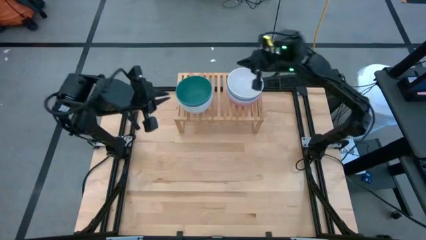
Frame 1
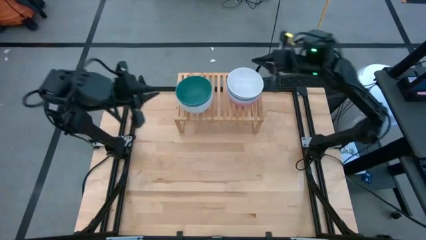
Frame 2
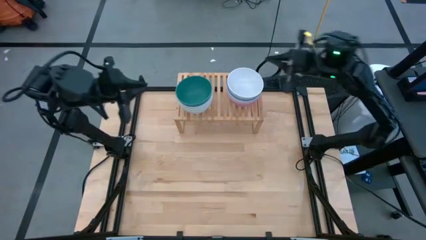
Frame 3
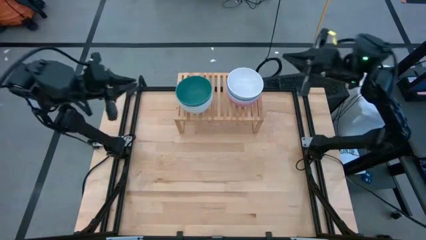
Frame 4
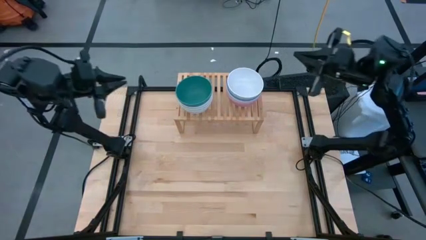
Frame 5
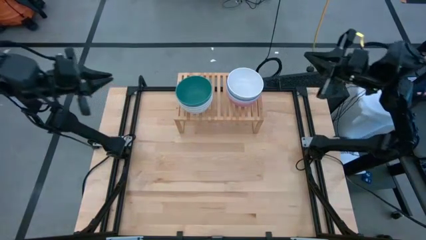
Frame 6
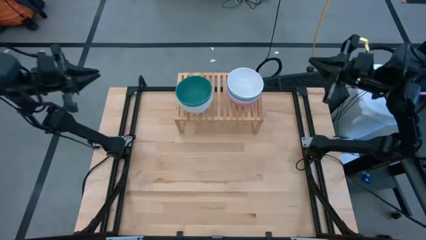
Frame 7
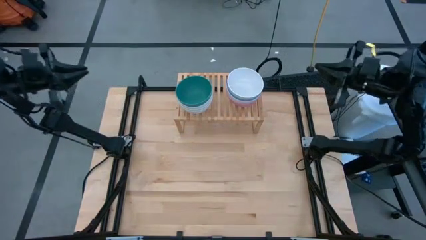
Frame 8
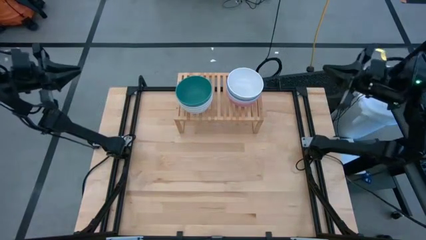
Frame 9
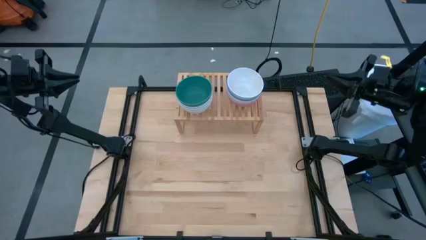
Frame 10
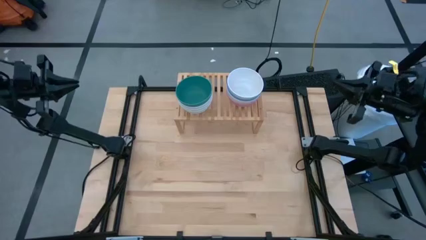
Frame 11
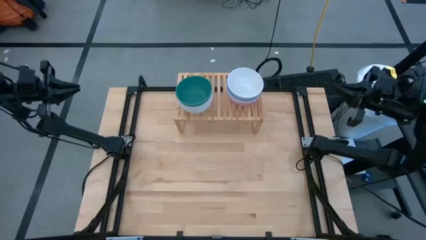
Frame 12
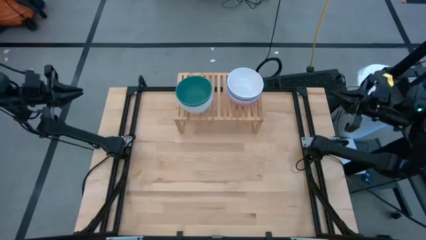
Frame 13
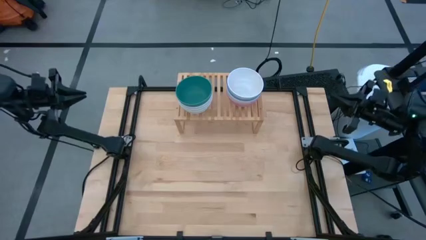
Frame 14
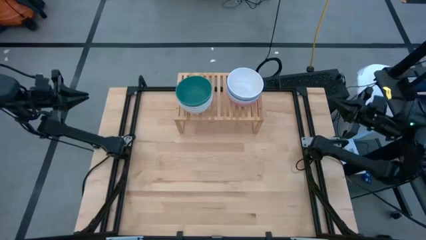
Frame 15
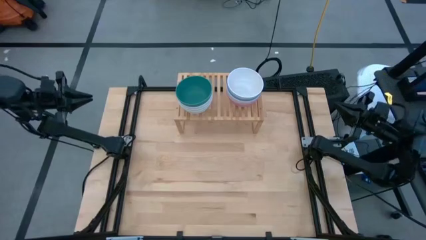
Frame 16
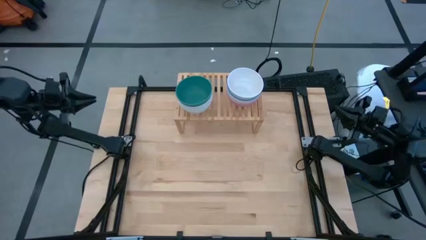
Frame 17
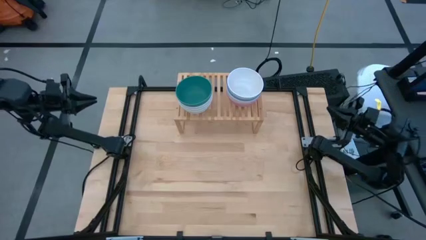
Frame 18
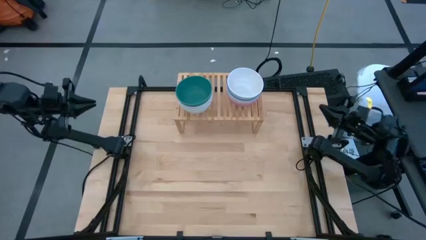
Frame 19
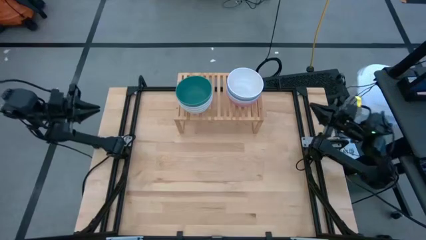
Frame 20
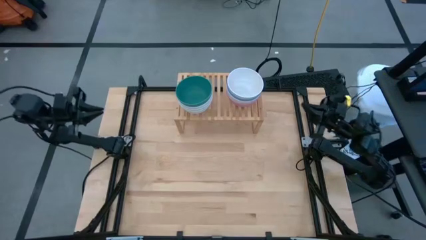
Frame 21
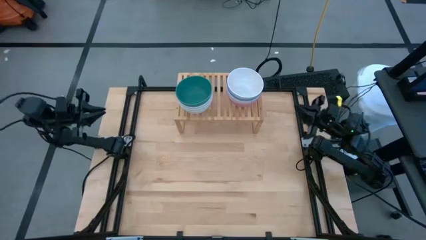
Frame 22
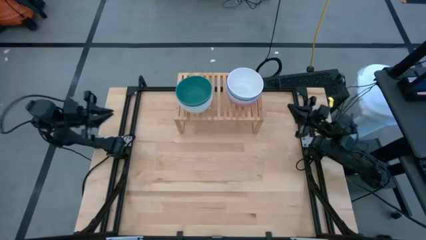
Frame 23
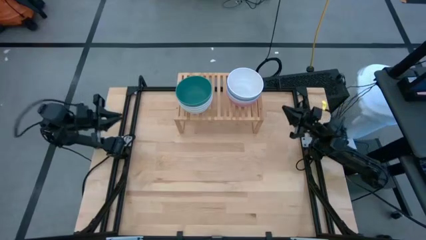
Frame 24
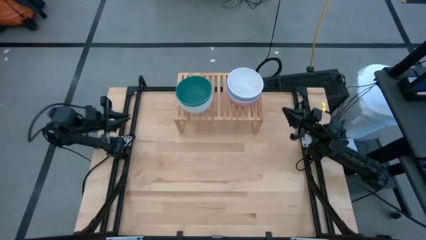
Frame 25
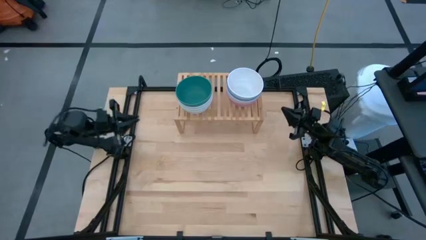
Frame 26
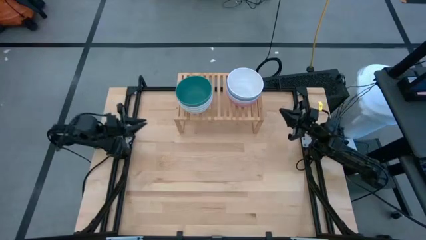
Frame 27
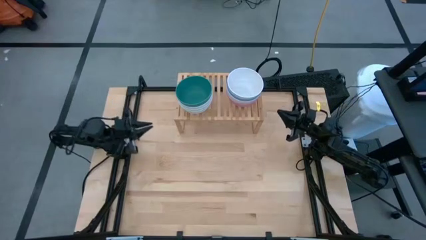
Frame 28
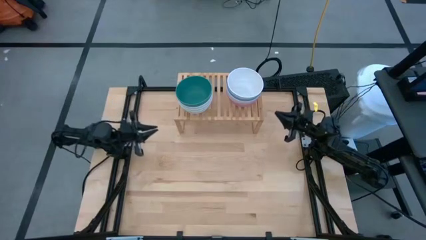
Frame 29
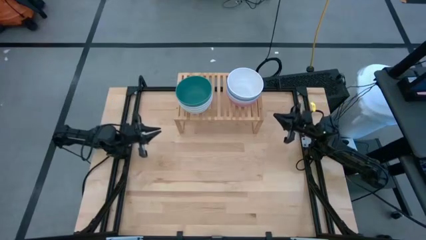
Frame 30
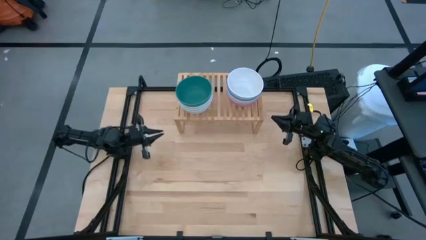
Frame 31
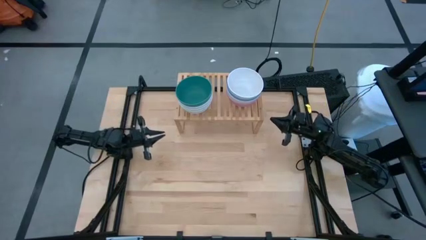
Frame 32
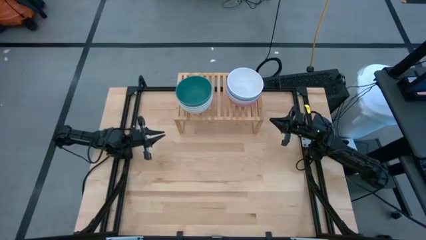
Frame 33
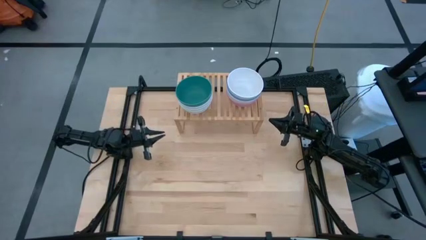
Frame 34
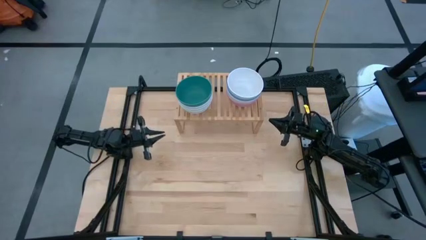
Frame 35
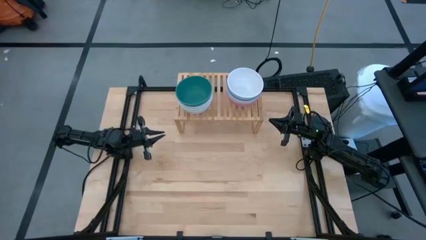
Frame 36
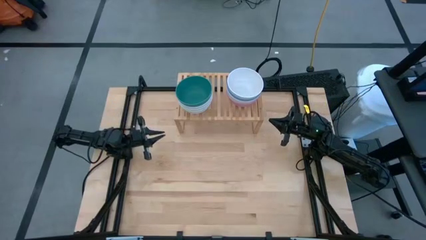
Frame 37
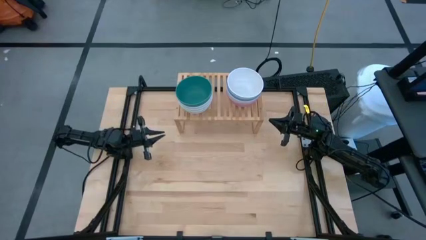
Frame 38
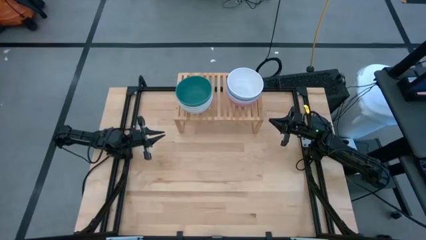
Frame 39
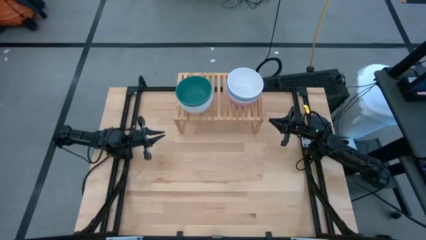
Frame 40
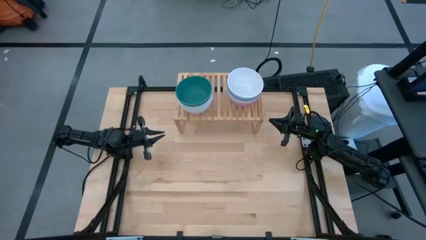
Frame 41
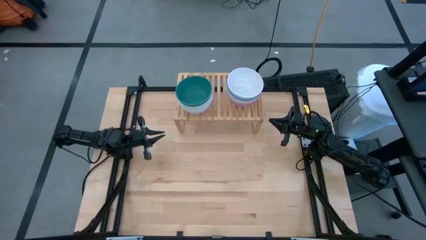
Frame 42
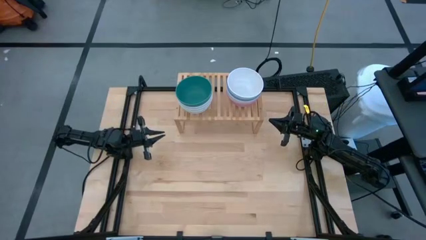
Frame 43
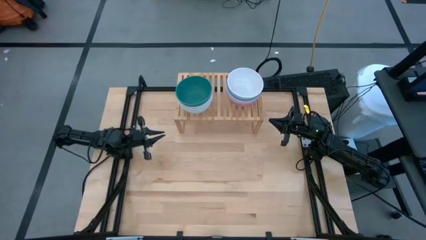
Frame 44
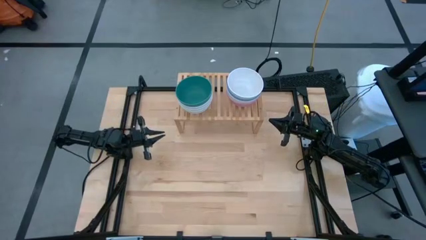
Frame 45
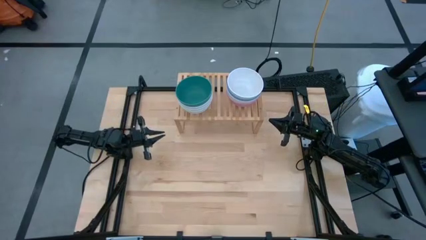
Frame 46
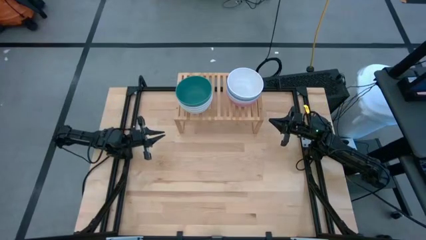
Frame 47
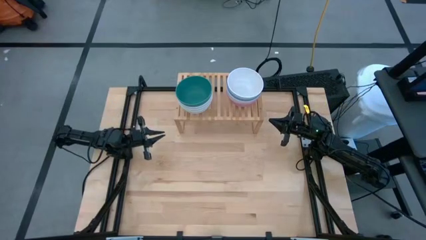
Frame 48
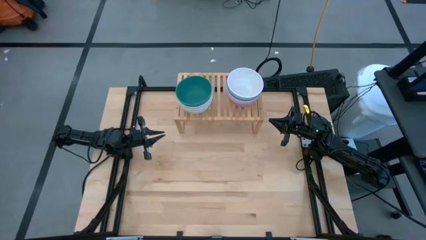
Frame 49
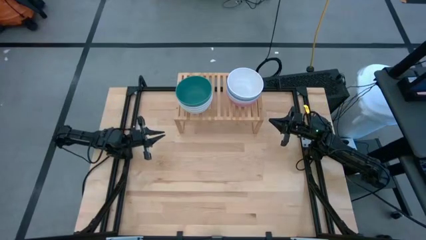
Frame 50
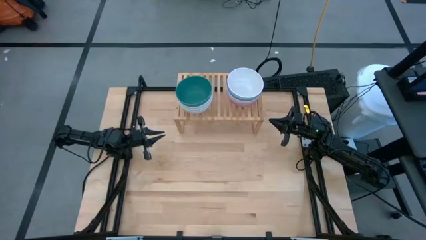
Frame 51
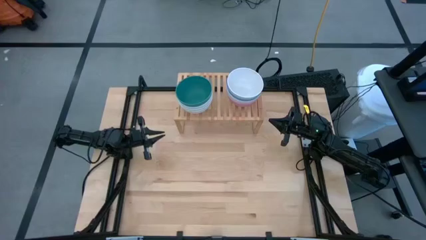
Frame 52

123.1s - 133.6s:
Task: Place and stack bowls onto a shelf
Return to Home Position

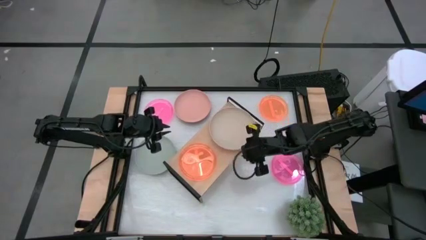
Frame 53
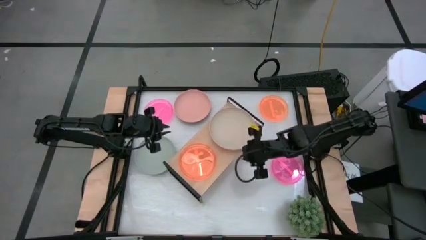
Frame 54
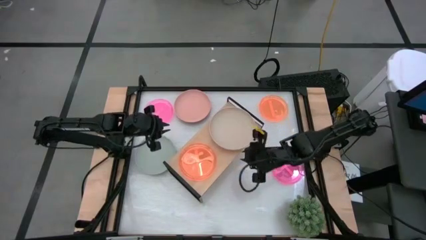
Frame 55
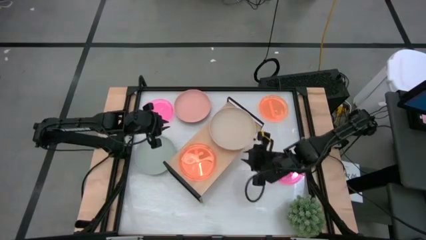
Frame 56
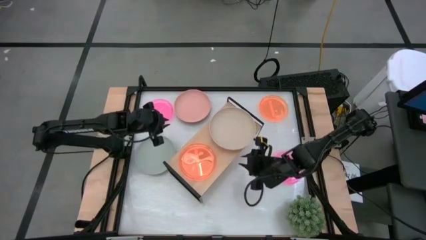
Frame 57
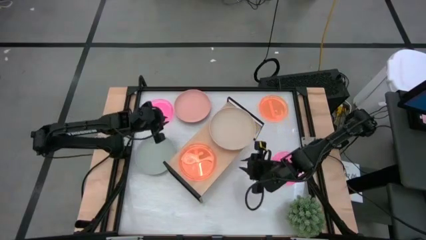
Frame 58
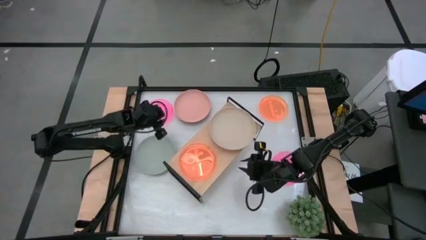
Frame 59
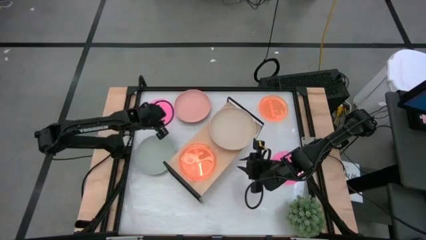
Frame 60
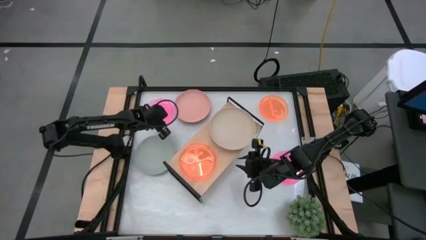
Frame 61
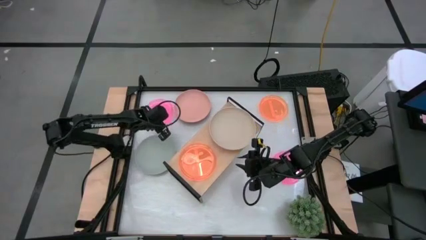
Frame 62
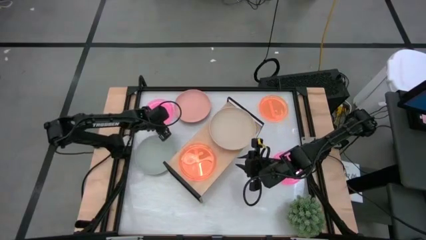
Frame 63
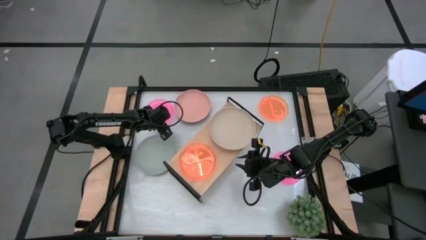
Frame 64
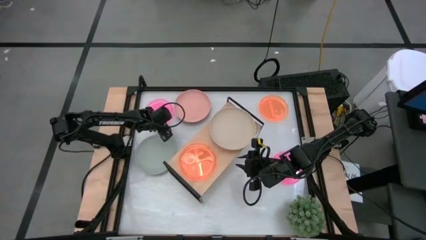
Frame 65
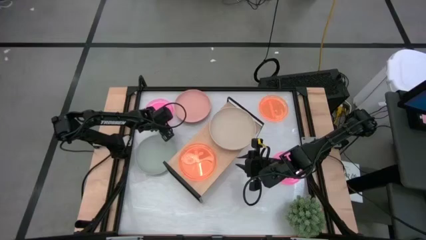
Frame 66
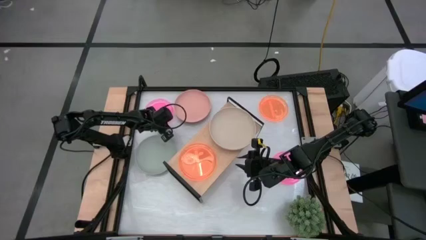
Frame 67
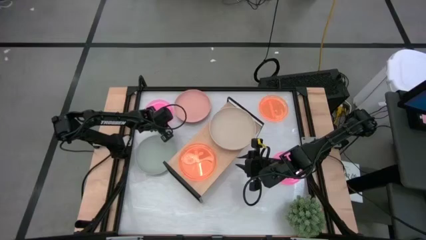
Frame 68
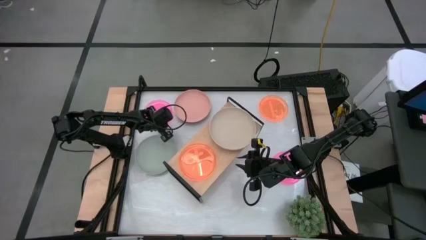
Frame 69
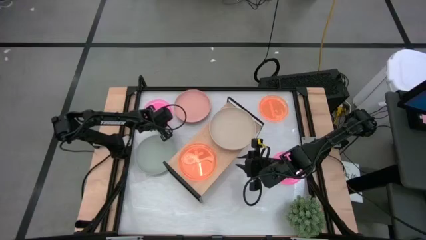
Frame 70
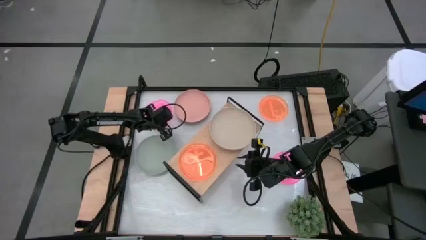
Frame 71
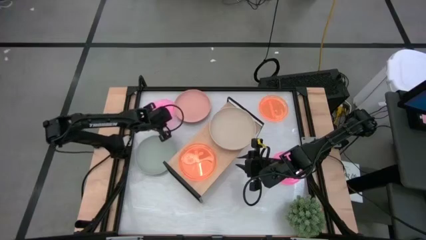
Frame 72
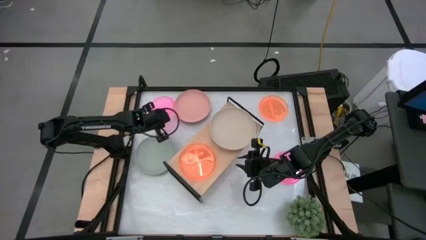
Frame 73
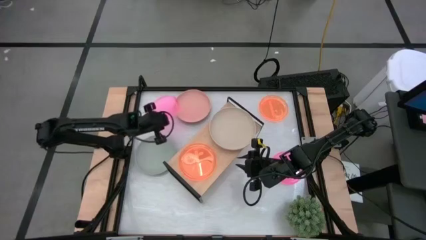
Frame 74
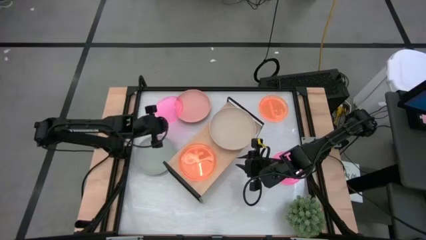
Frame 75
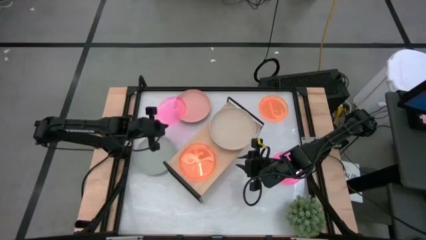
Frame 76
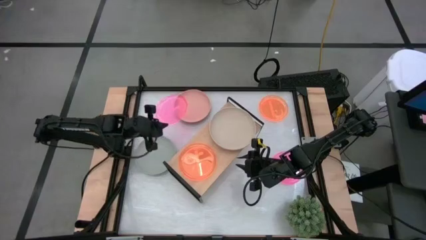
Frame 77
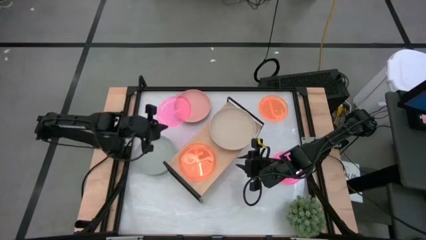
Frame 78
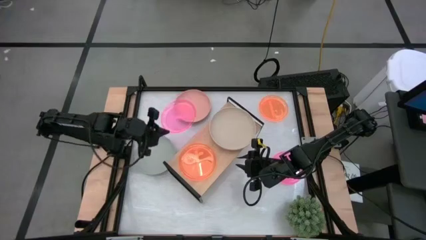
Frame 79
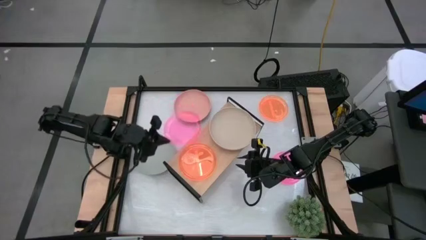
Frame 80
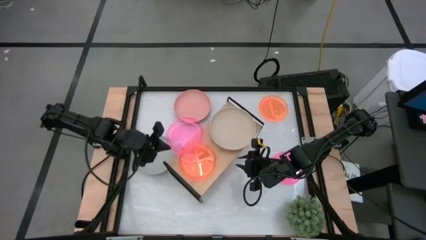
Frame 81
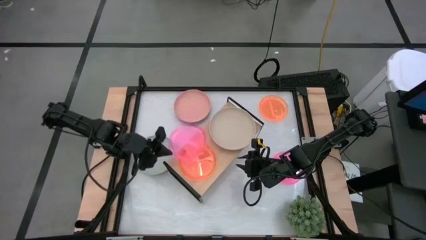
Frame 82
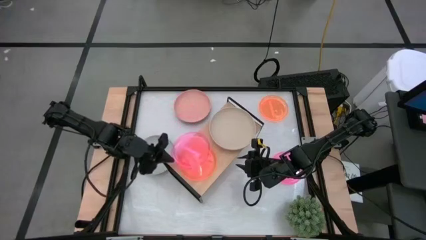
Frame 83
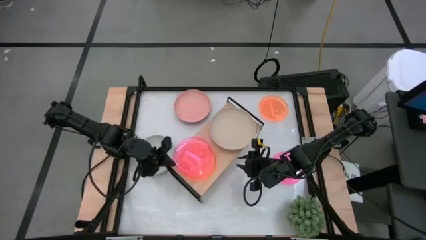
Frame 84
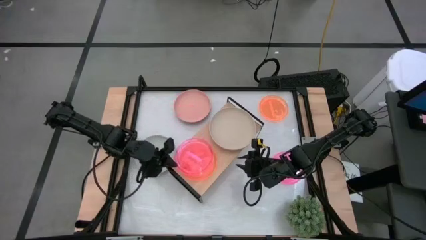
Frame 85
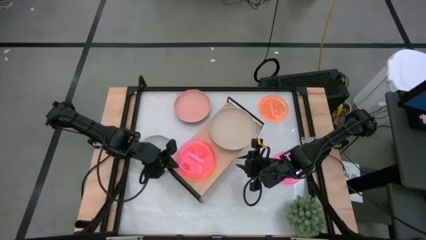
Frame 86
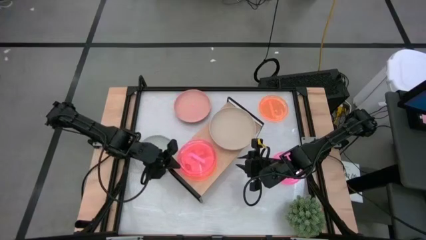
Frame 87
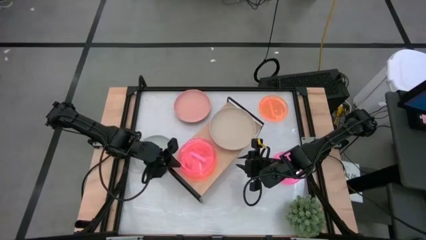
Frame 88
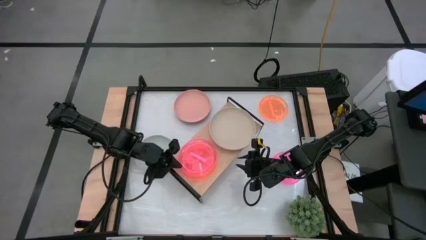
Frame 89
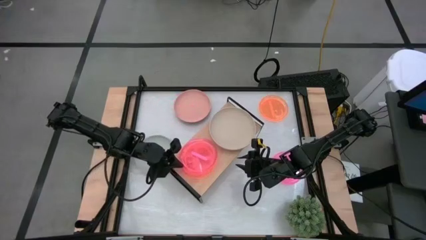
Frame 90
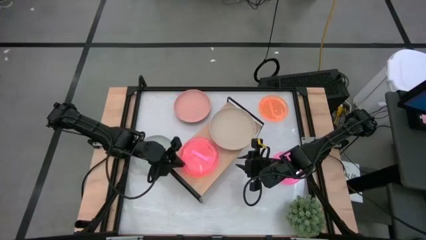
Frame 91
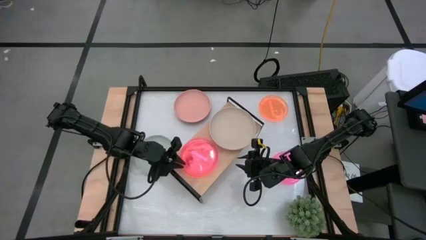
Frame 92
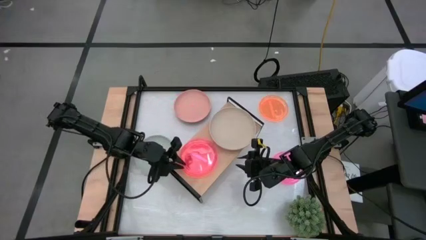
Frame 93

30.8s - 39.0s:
Task: Place and stack plates onto a shelf
Stack the small top pink plate on top of the small orange plate on the shelf
